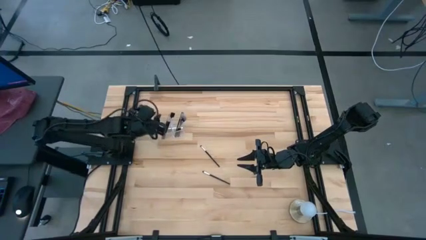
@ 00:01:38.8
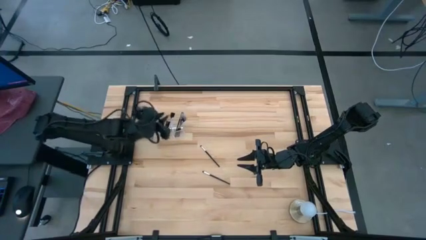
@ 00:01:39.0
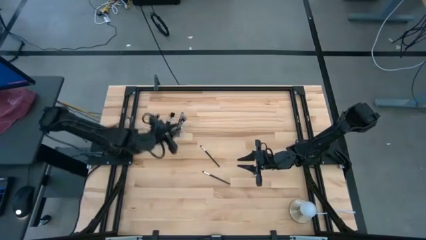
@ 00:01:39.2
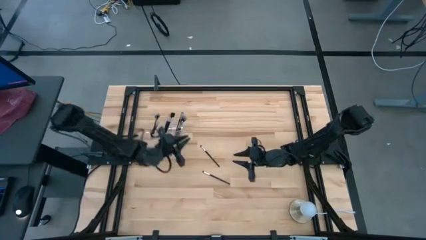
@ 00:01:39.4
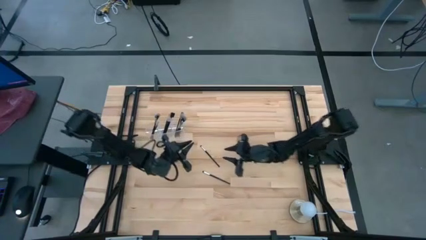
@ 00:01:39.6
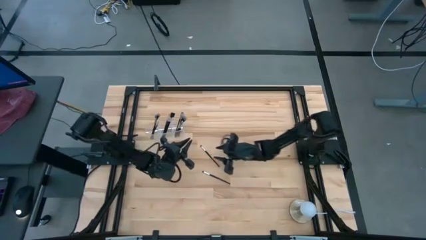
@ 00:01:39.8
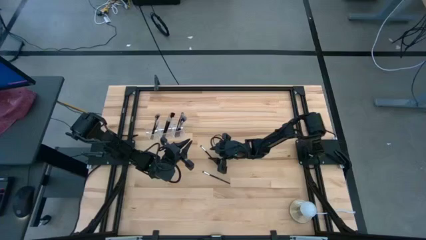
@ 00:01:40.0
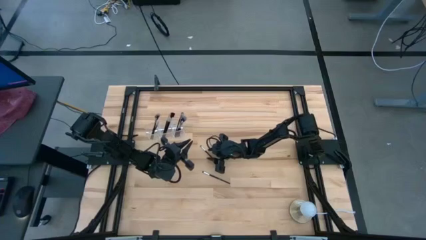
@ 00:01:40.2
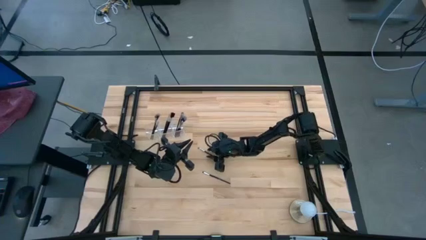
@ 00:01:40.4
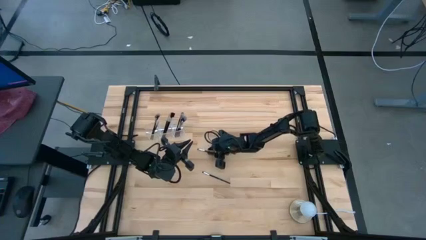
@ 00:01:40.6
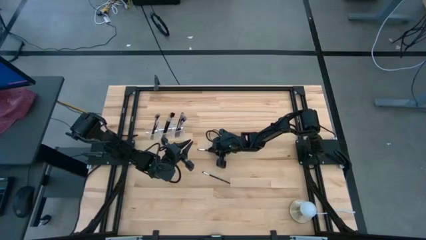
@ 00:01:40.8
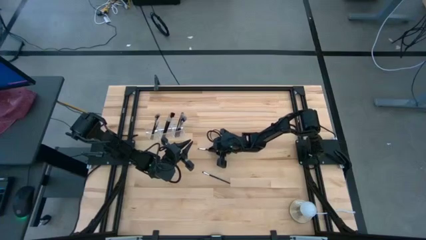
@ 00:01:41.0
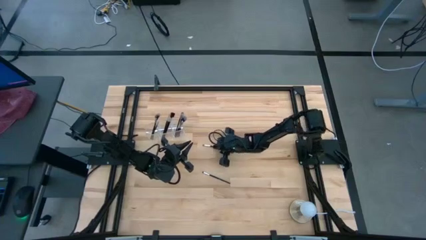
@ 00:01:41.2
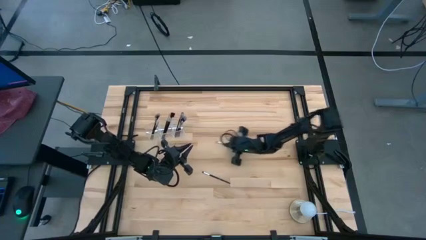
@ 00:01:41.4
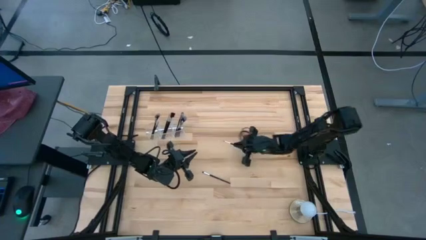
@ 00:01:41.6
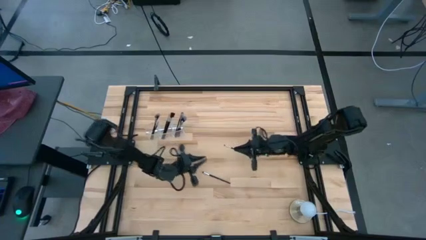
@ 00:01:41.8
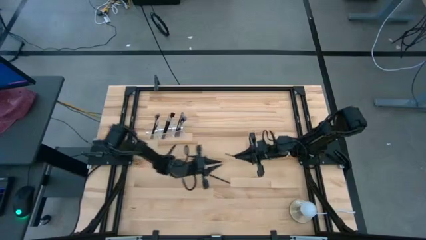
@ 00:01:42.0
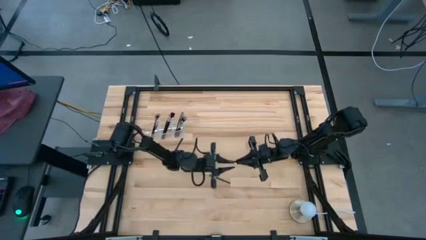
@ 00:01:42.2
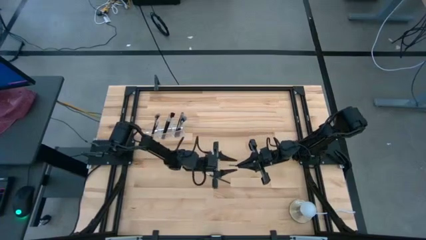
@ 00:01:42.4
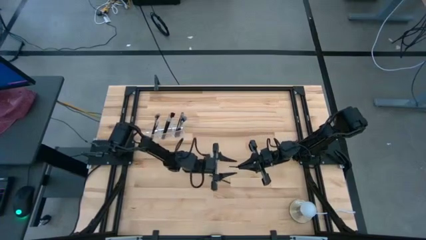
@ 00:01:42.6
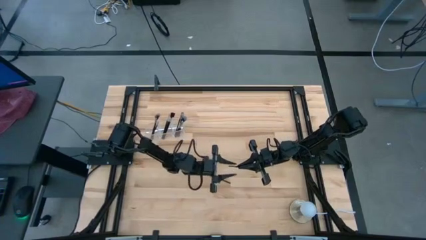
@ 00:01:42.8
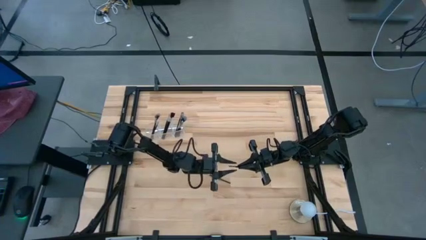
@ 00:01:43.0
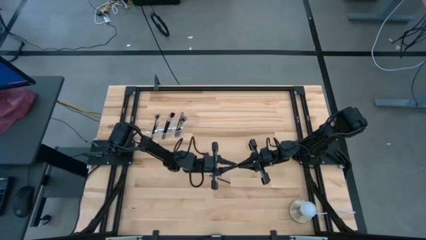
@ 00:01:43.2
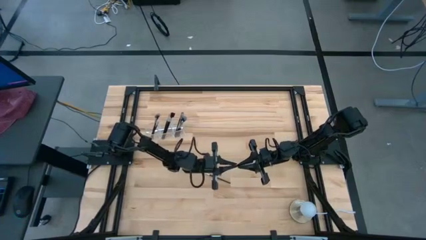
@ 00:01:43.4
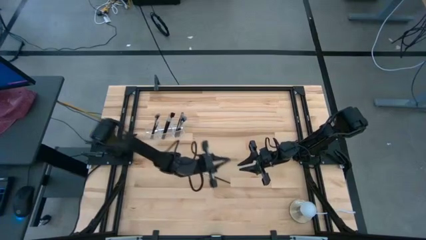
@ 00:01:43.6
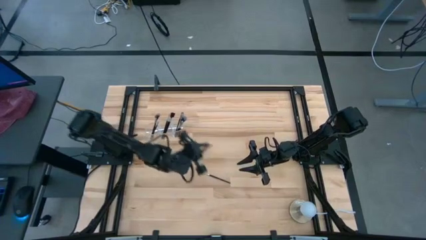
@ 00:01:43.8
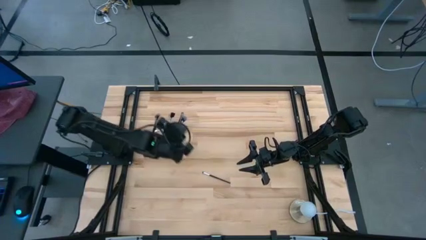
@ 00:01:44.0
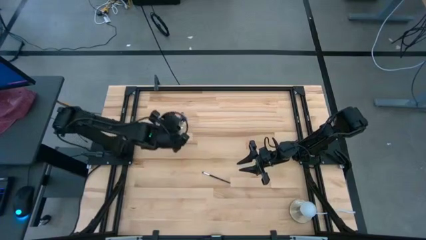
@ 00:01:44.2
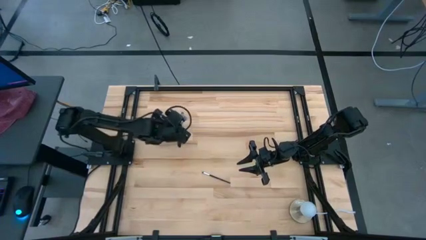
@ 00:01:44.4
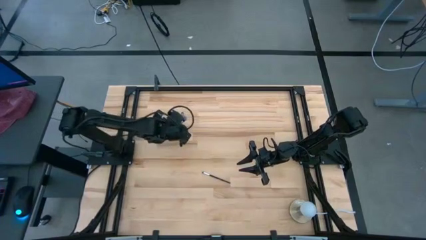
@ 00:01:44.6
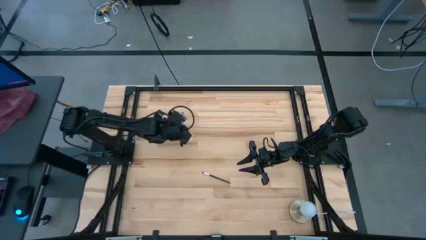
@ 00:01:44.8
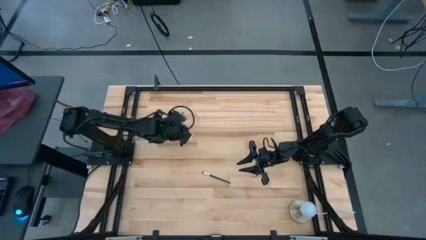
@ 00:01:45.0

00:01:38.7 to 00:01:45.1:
Task: Put items in baskets/containers
Put the eyeshadow brush into the transparent organizer

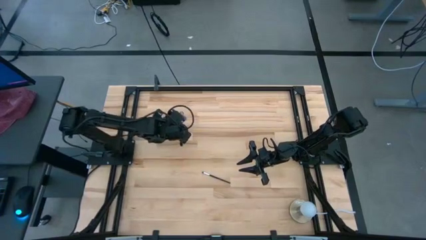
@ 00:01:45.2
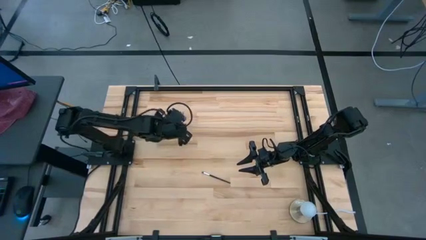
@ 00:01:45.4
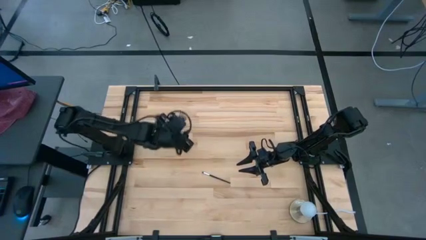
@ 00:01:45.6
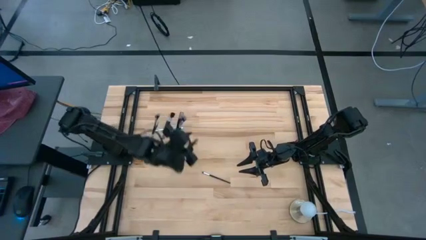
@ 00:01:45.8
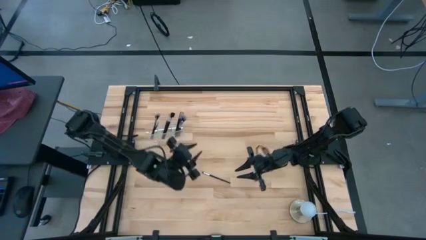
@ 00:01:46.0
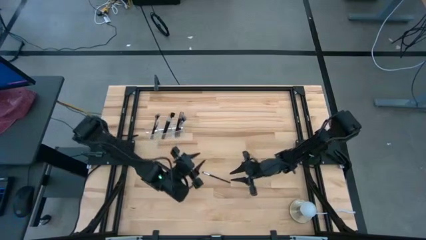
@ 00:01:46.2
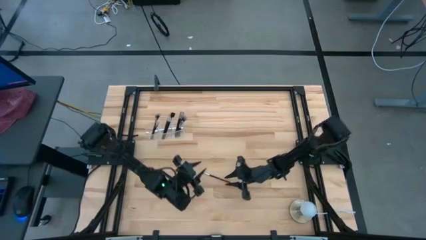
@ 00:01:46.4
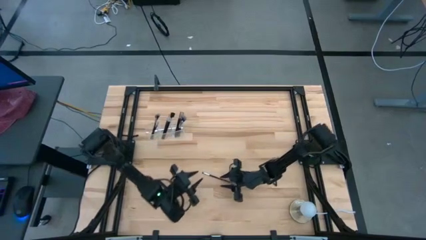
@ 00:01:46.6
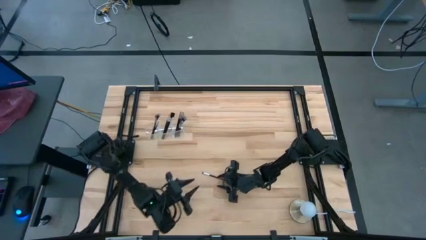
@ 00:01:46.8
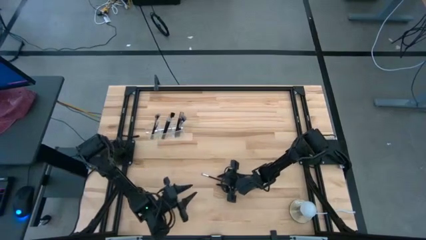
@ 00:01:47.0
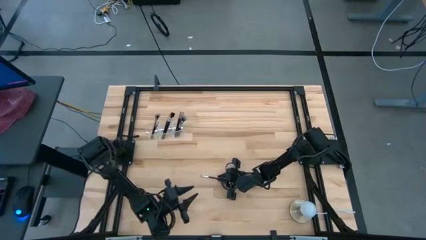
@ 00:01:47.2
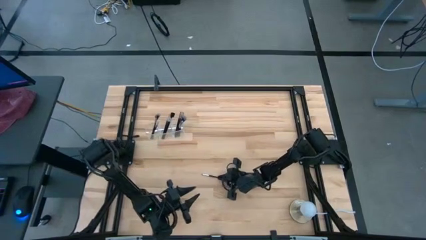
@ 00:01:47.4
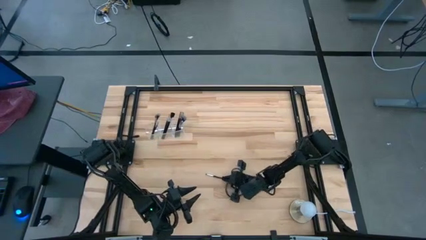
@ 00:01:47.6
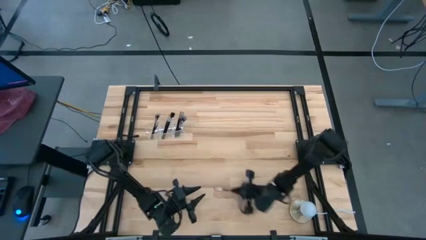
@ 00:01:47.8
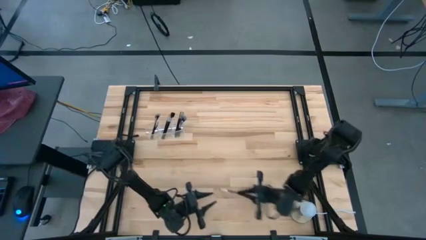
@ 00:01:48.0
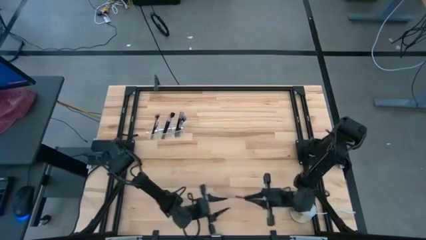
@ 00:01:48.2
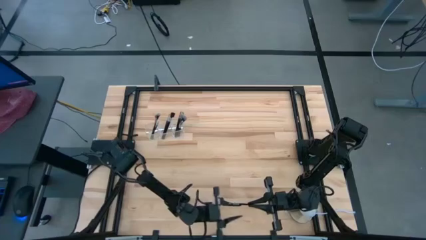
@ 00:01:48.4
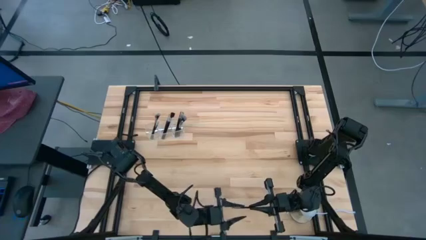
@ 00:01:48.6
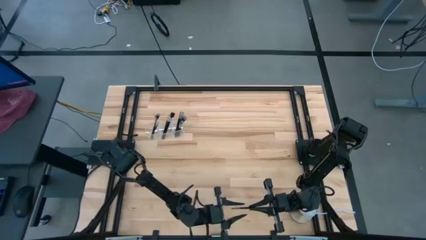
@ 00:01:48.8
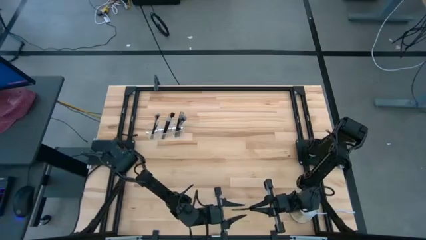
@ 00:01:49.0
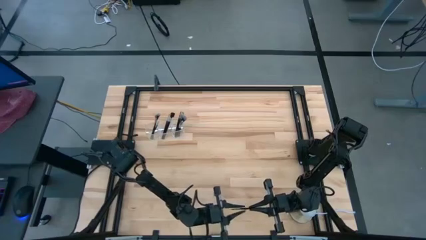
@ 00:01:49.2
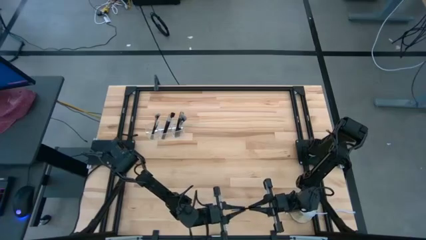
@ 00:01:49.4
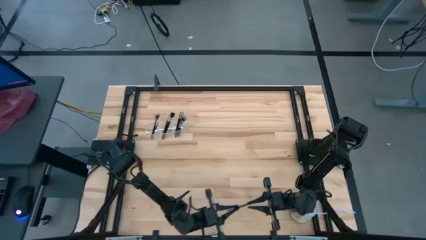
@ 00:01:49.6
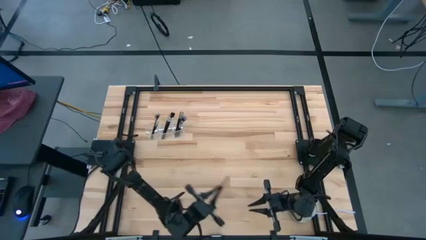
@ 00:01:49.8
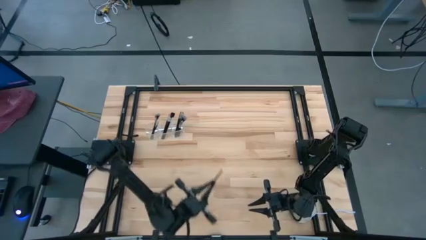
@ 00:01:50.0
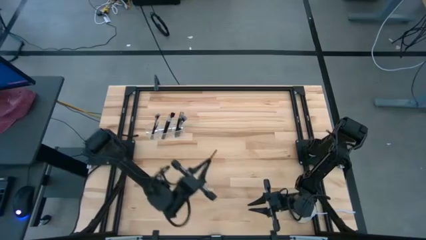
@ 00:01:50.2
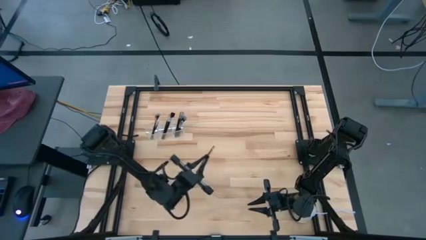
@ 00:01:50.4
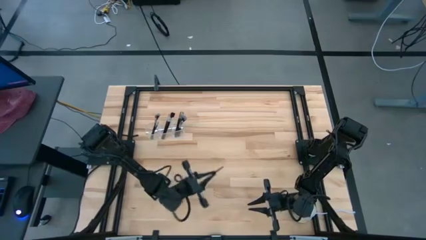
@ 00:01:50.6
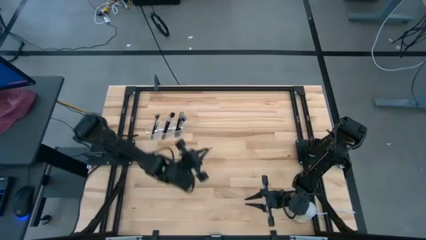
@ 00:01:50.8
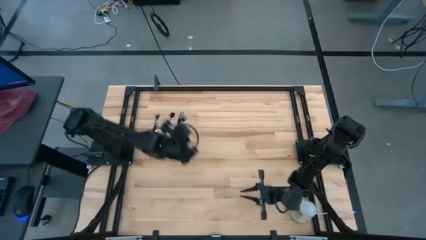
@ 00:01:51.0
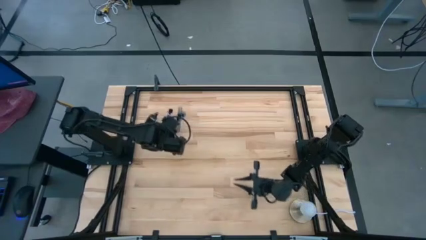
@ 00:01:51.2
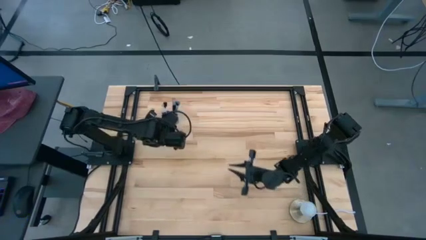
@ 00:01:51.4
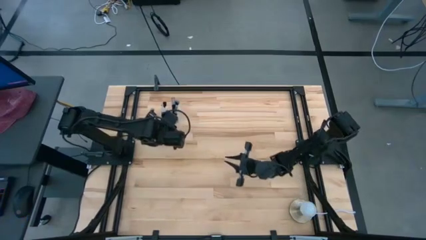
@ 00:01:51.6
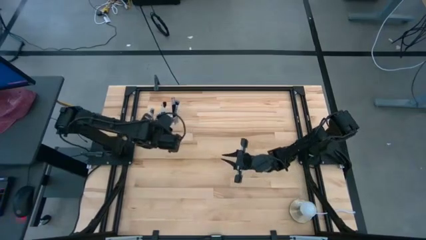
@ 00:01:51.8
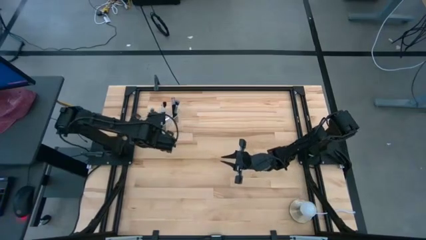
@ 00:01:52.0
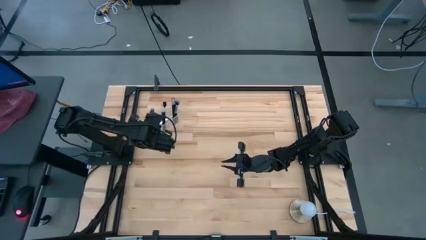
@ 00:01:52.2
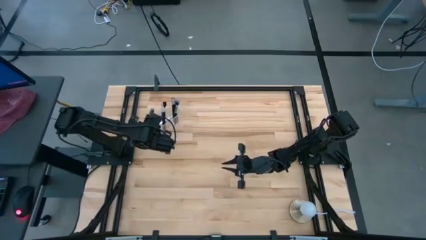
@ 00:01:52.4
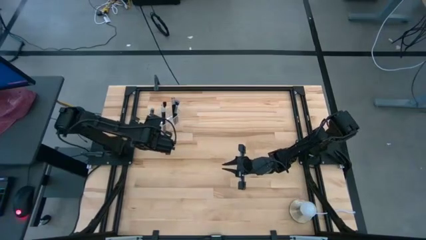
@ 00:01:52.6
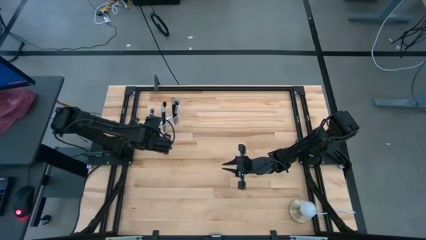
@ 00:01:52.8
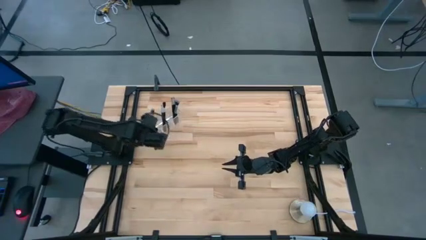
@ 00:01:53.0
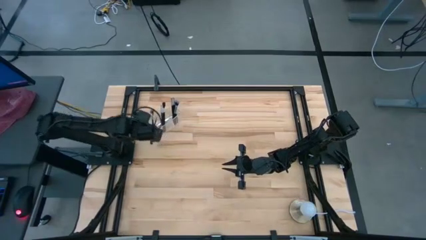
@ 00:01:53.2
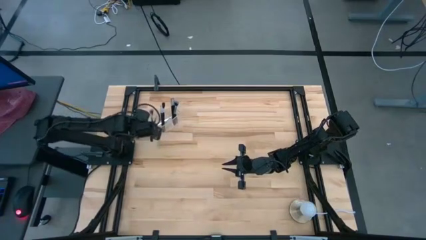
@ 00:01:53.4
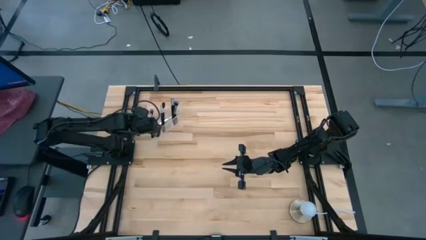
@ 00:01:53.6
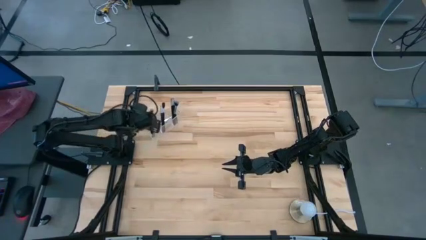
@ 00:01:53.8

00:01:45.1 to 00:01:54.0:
Put the eyeshadow brush into the transparent organizer

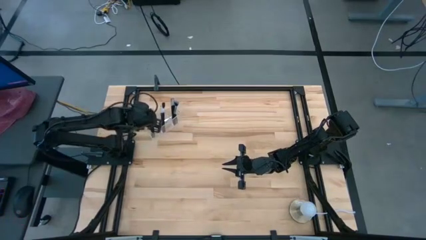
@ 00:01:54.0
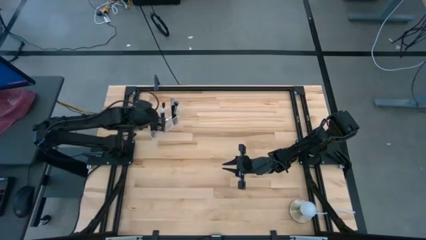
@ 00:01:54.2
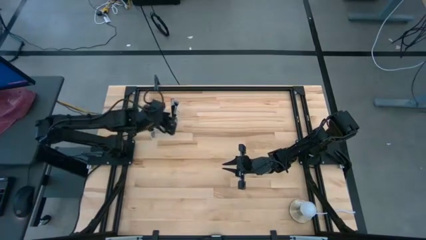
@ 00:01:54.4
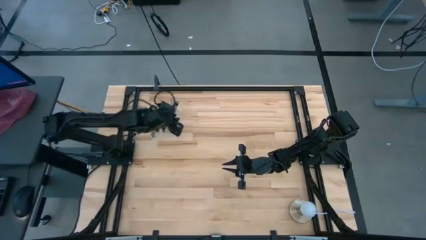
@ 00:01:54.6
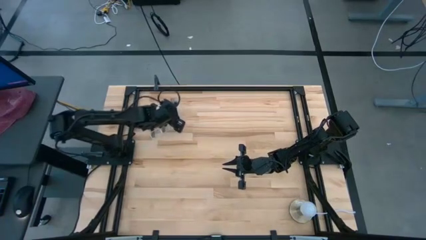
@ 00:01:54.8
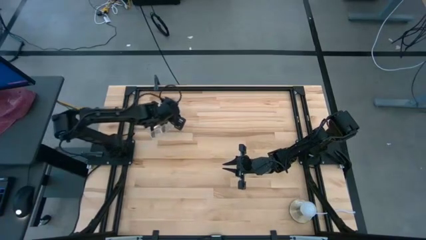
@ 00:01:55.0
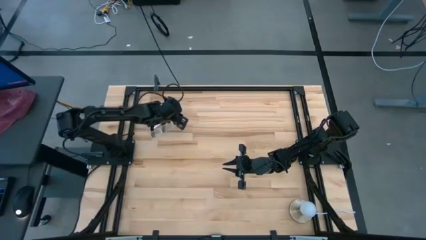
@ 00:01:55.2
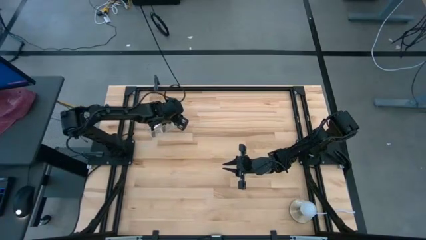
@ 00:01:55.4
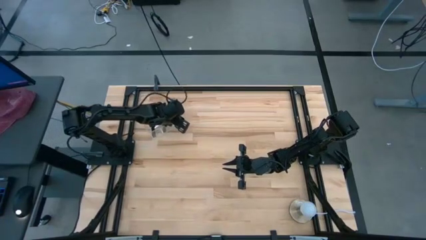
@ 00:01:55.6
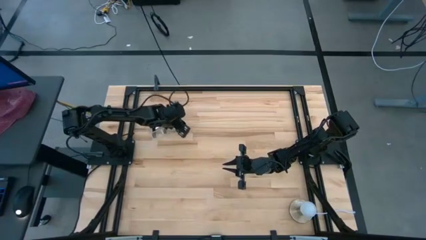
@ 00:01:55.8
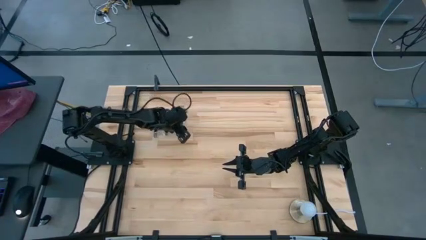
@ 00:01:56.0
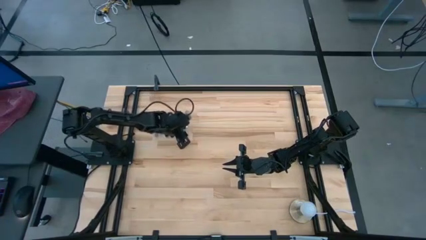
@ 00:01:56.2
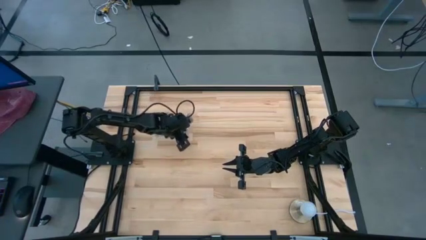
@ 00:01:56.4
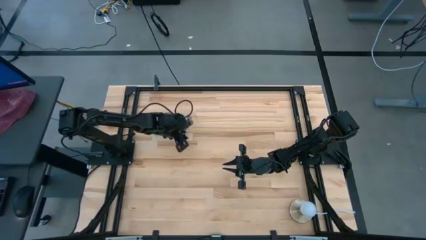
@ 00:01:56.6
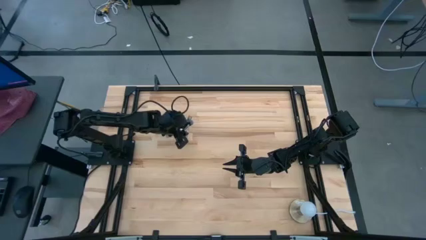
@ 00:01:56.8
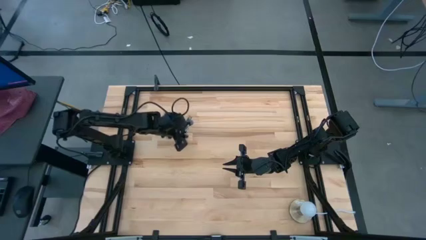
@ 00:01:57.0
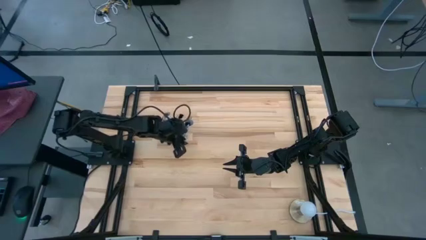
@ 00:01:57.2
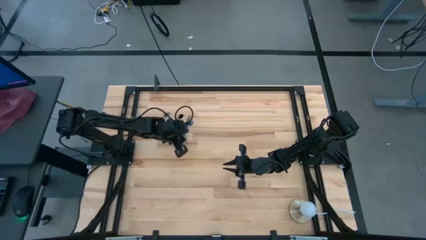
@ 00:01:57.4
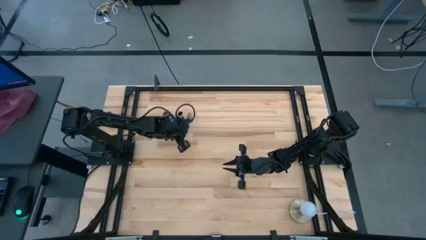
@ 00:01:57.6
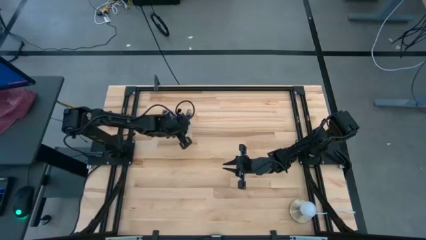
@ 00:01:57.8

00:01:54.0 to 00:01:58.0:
Adjust the transparent organizer
